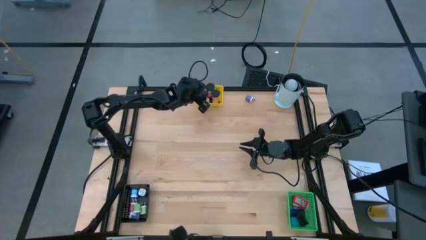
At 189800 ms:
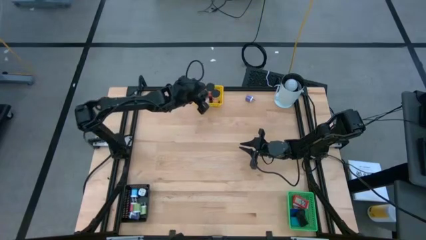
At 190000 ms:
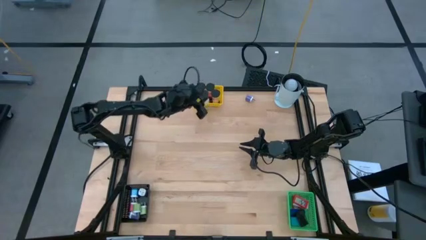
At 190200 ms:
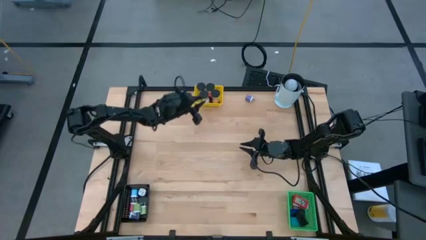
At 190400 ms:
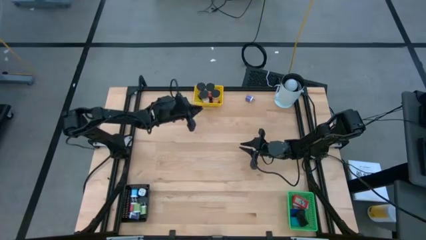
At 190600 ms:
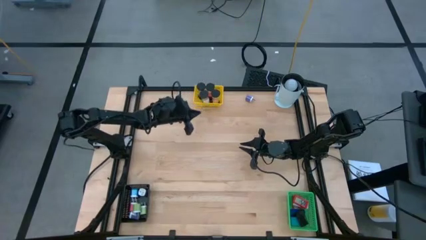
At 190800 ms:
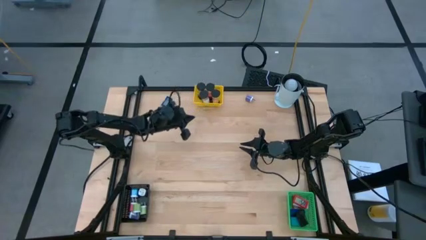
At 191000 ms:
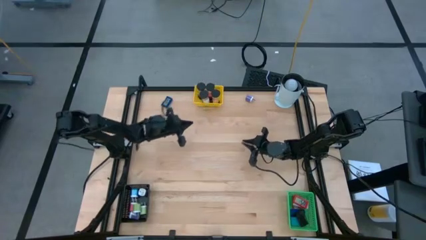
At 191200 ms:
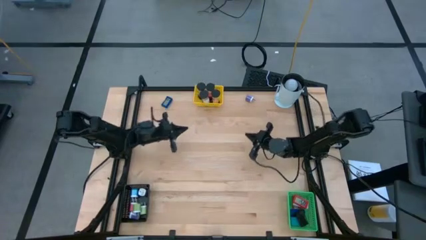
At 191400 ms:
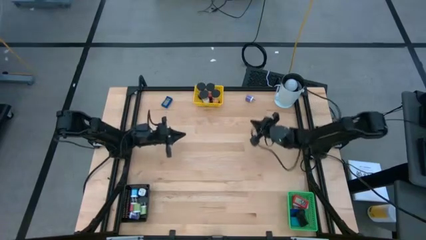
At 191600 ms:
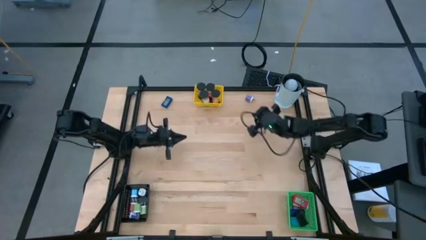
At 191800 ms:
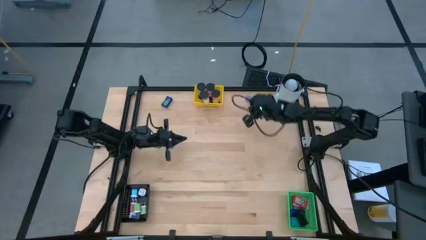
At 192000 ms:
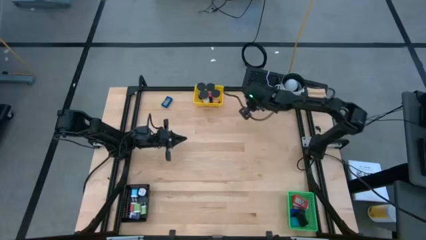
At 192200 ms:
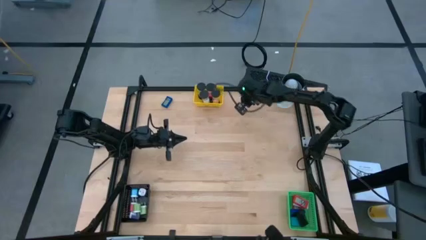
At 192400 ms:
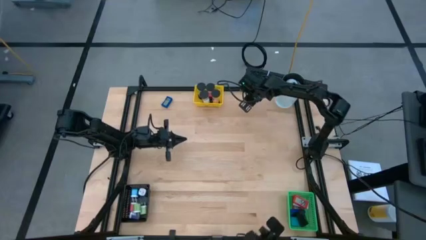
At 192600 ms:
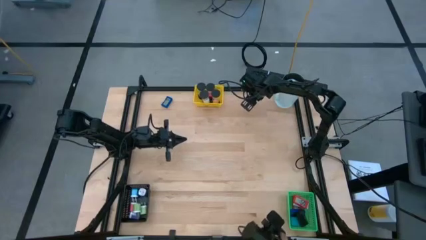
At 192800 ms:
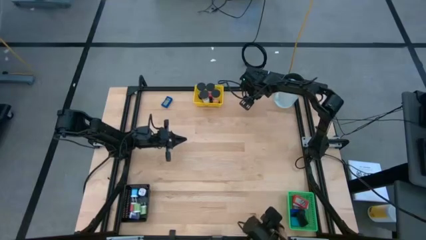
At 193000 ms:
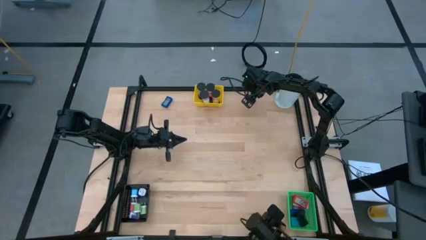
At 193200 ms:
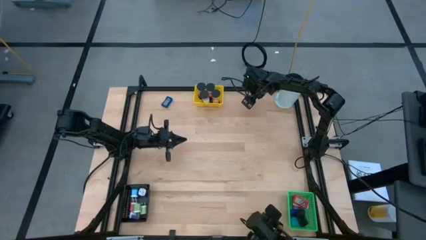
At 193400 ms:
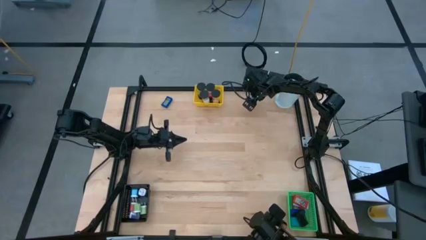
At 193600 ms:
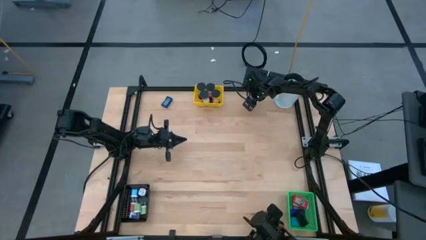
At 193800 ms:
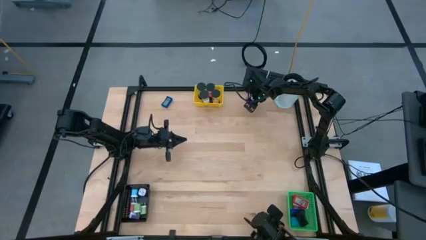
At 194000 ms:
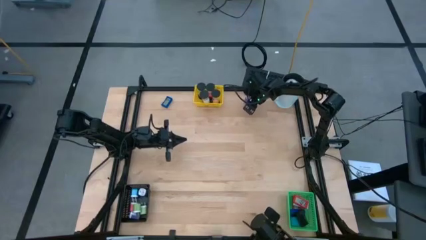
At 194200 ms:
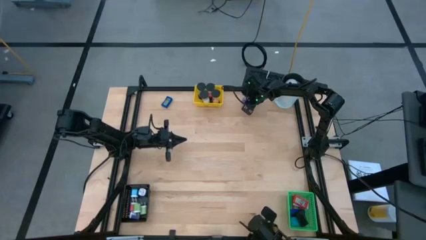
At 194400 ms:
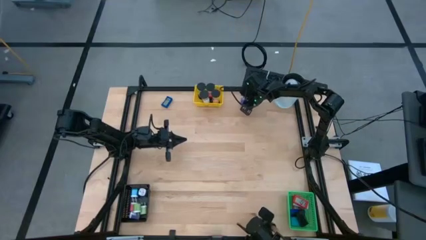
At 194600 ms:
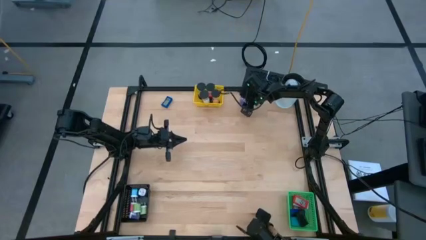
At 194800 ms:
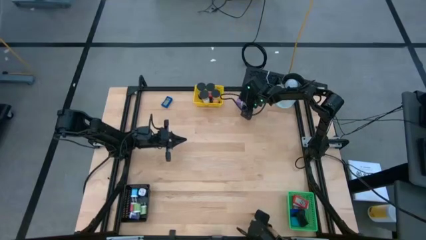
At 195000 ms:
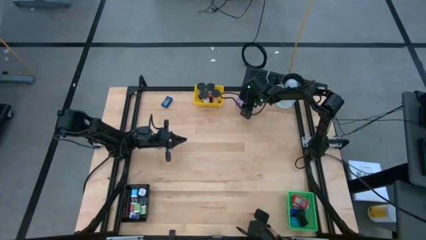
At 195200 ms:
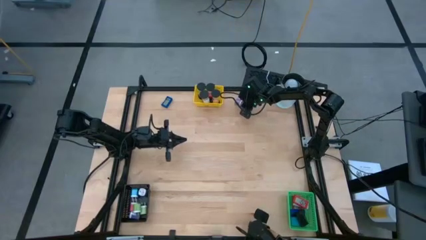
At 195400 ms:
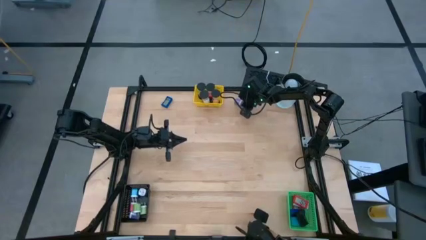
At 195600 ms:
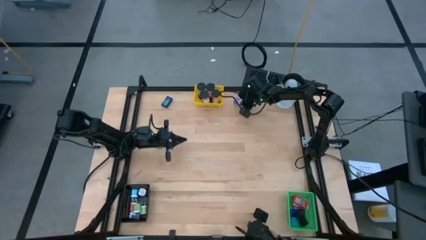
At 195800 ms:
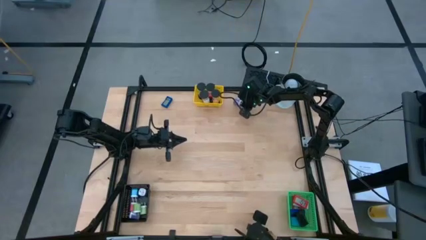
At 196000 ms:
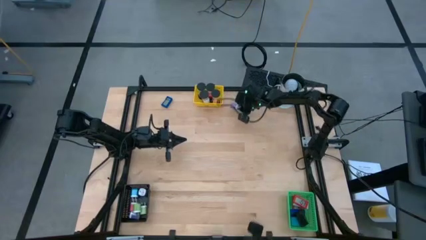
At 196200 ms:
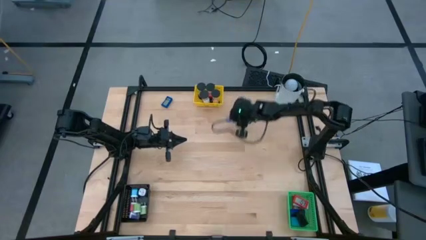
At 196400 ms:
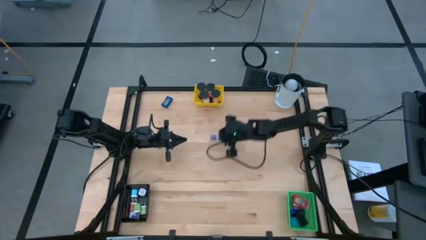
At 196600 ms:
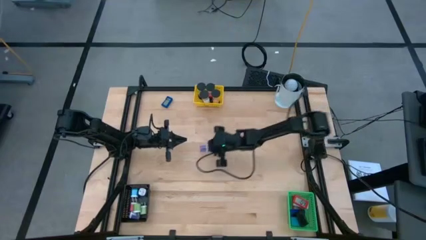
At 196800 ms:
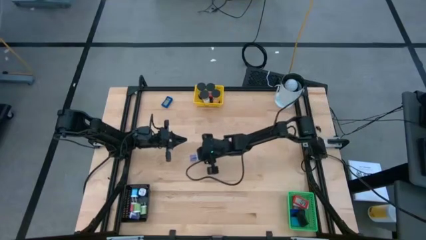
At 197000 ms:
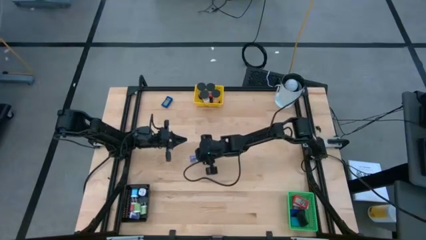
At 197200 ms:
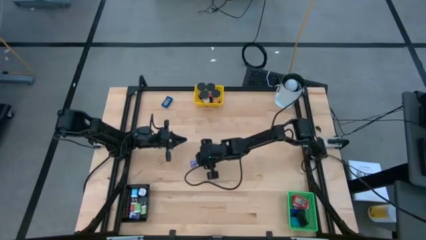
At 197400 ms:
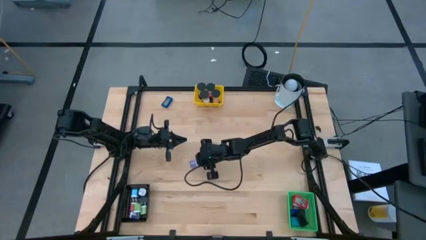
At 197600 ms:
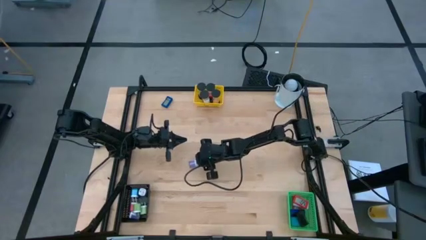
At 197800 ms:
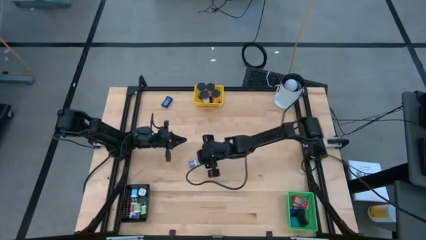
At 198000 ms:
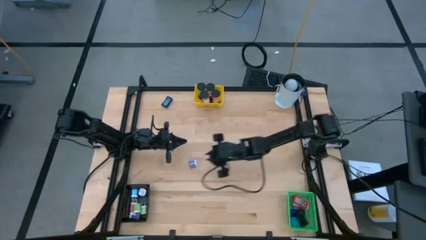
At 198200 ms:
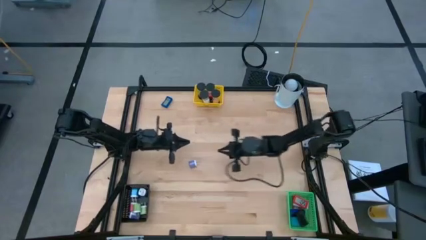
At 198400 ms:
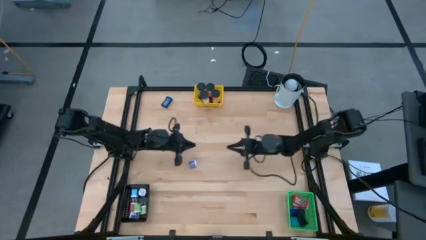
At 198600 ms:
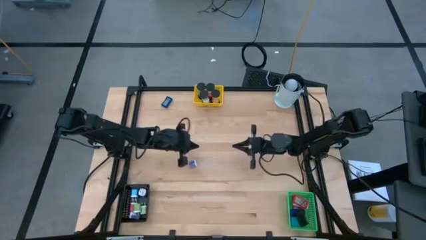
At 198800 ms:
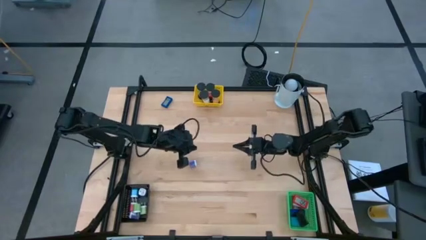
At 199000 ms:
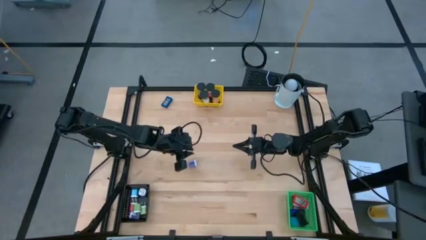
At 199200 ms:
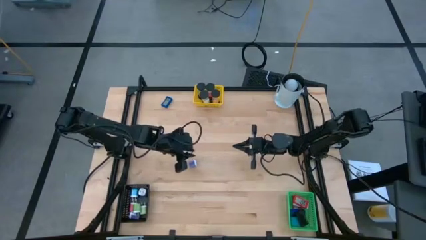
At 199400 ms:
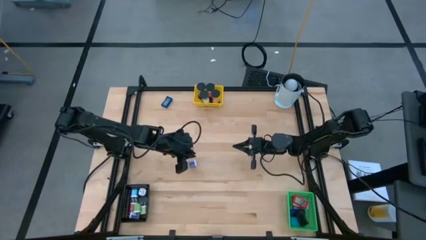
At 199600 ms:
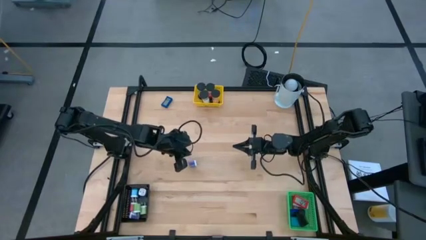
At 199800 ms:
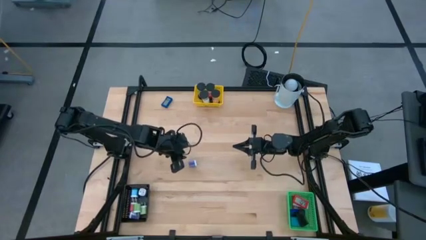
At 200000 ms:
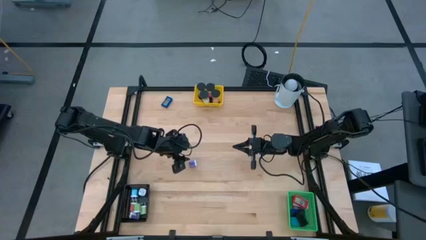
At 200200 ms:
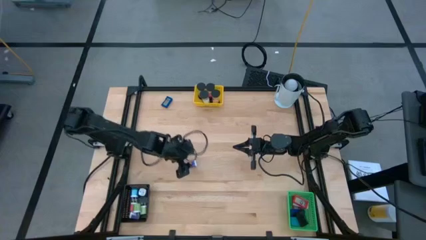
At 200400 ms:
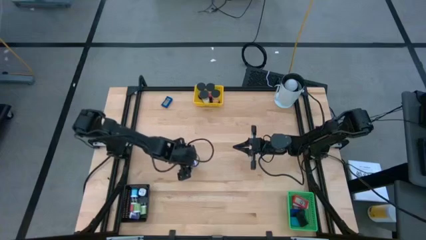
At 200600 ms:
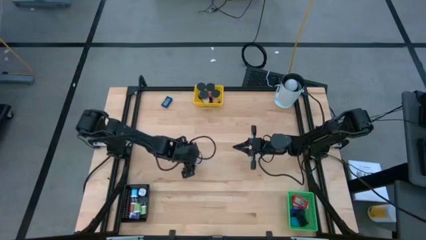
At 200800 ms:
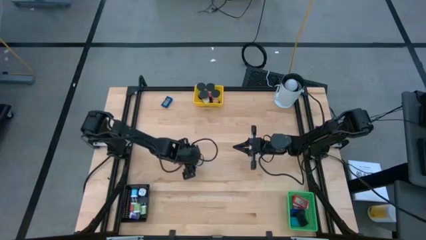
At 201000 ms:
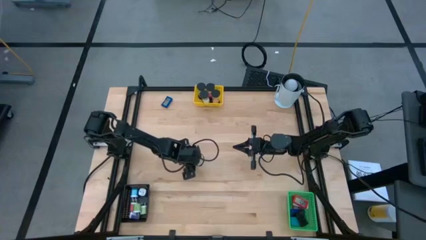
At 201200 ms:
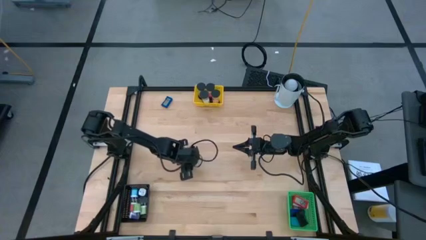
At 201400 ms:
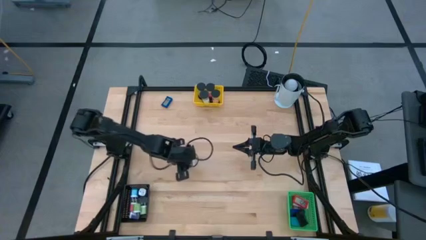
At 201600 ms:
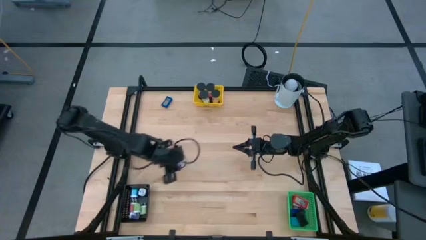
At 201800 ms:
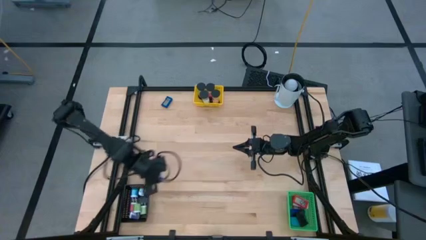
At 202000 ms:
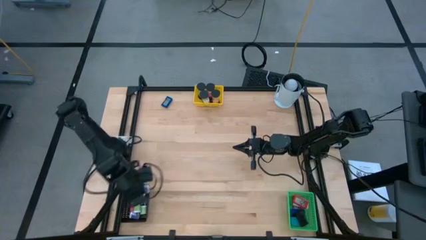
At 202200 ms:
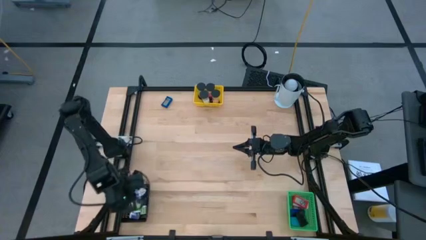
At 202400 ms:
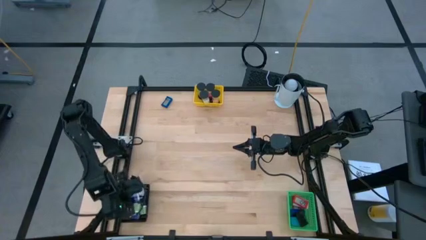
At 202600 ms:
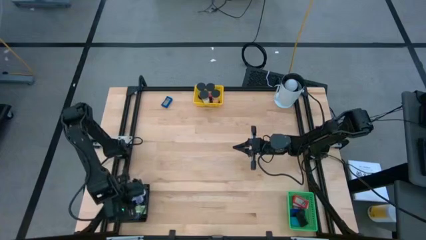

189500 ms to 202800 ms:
Task: Pick & Place Office items
Put the purple charger adapter into the black bin

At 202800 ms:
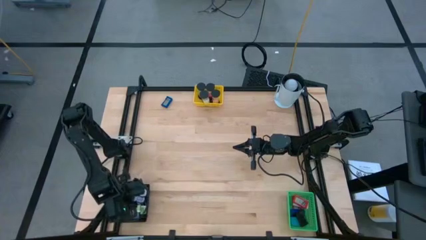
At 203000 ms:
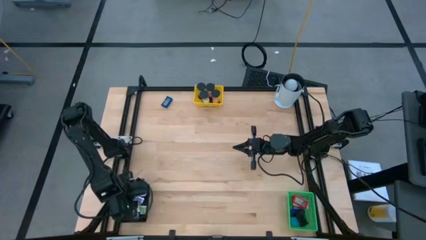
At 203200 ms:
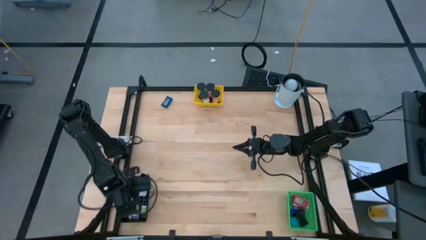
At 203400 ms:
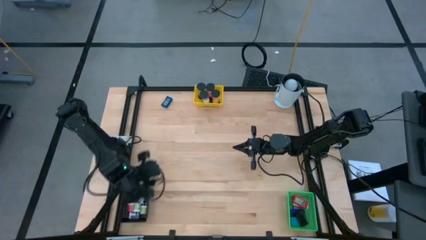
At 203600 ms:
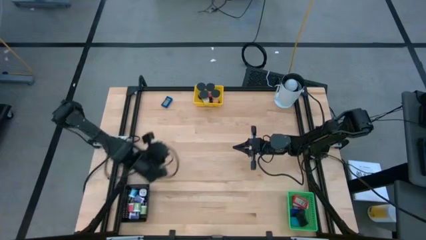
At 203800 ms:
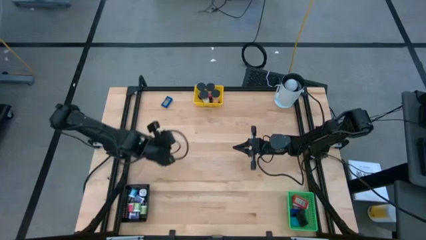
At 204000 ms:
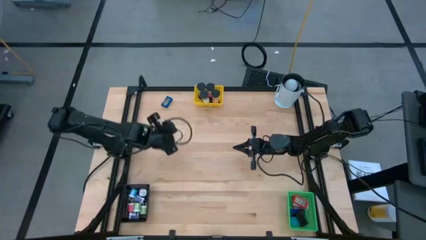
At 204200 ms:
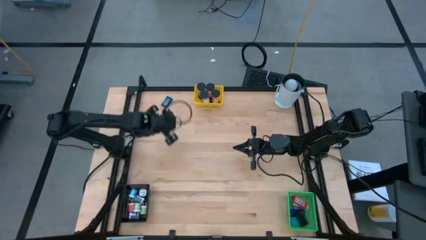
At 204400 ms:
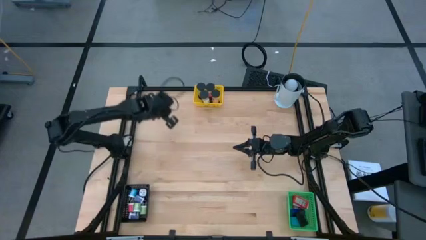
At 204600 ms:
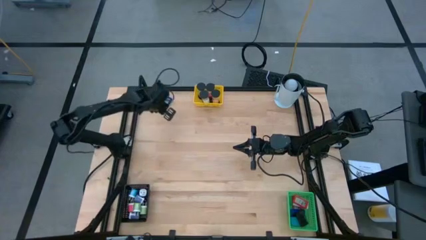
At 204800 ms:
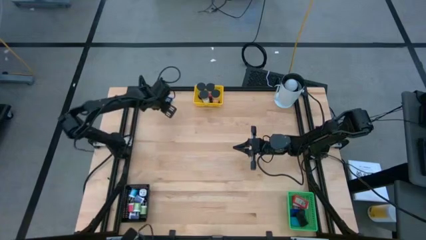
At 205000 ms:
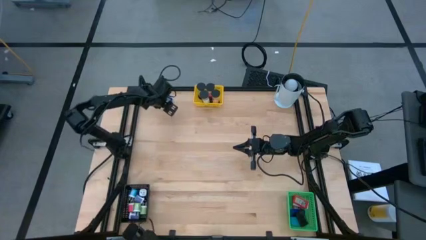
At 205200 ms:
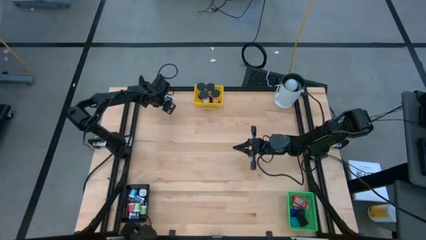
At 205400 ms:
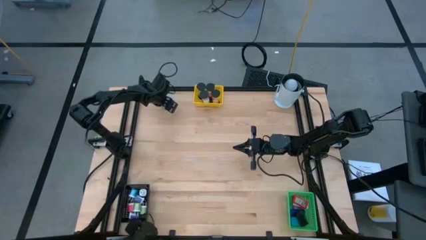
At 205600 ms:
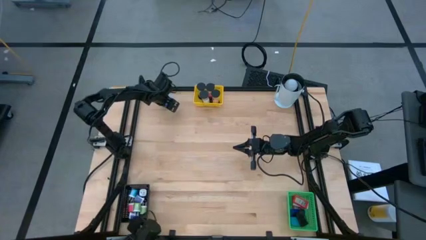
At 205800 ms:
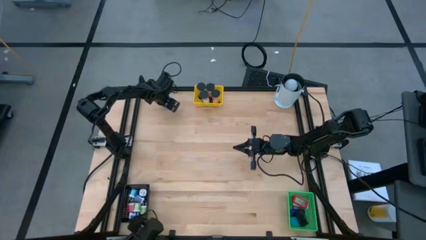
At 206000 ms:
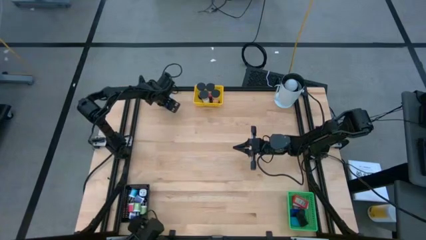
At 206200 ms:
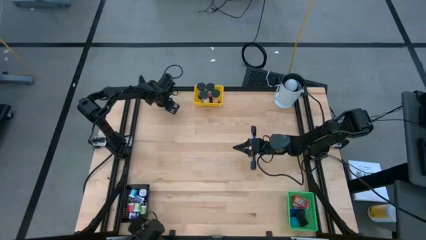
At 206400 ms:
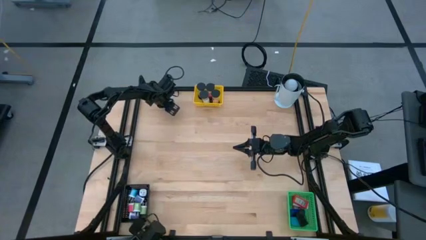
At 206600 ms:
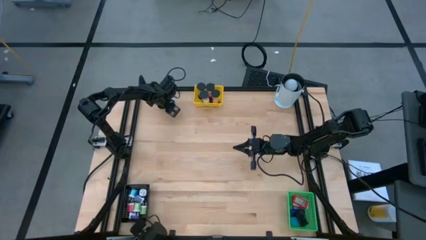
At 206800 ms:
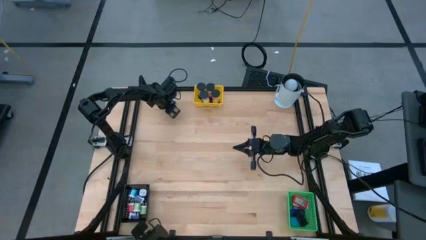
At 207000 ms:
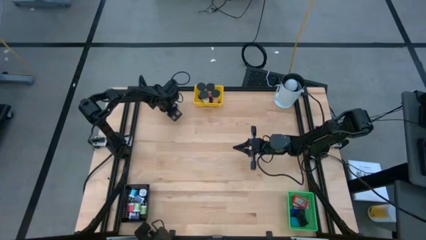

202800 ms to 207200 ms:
Put the dark blue digital timer into the green bin
